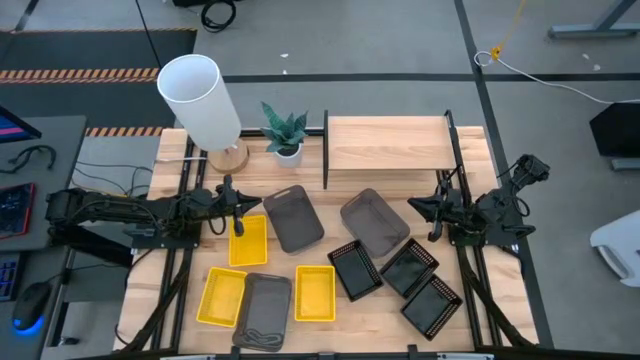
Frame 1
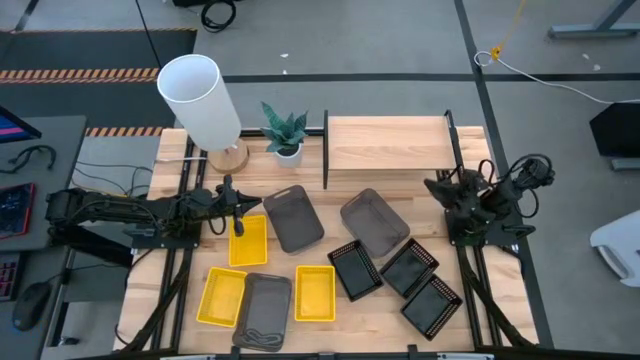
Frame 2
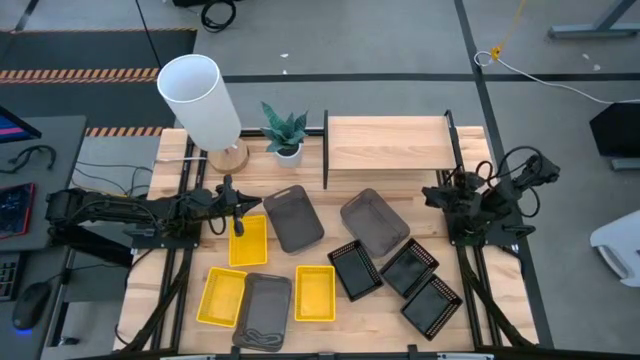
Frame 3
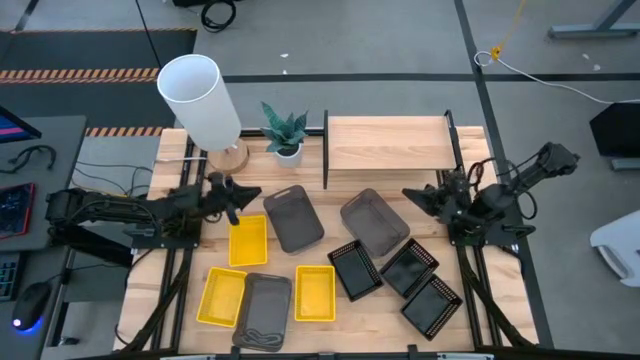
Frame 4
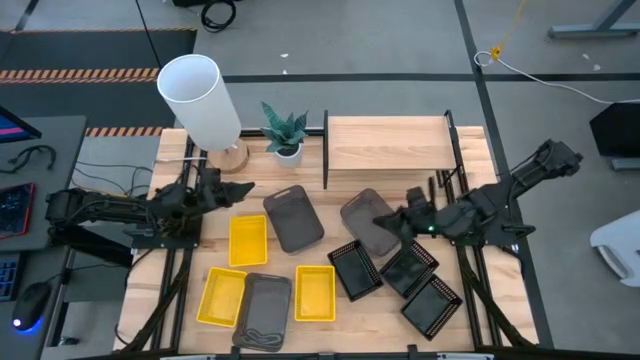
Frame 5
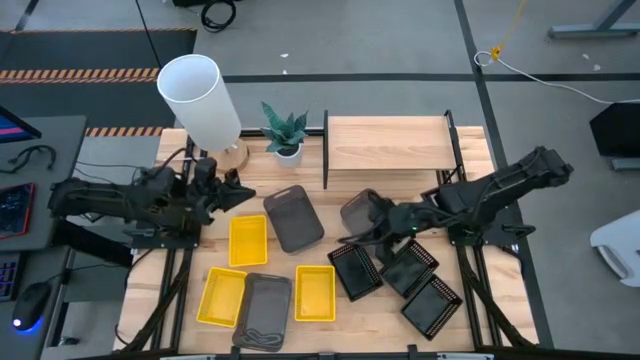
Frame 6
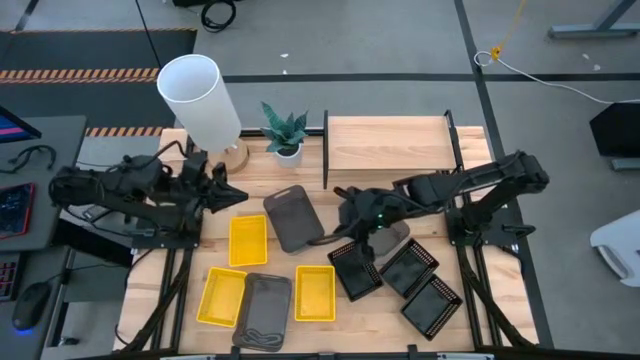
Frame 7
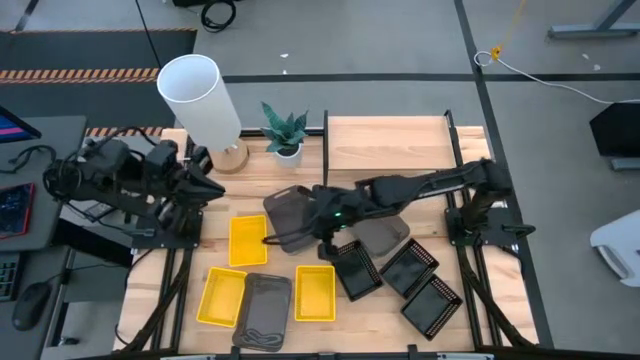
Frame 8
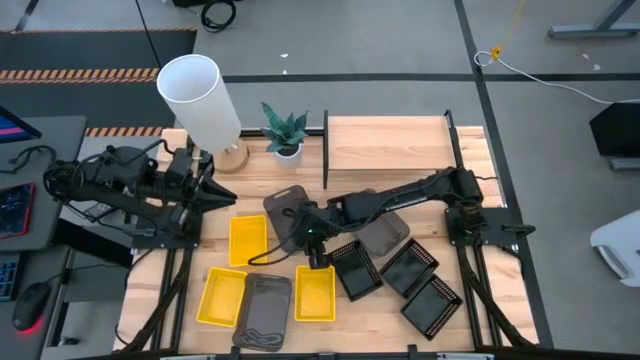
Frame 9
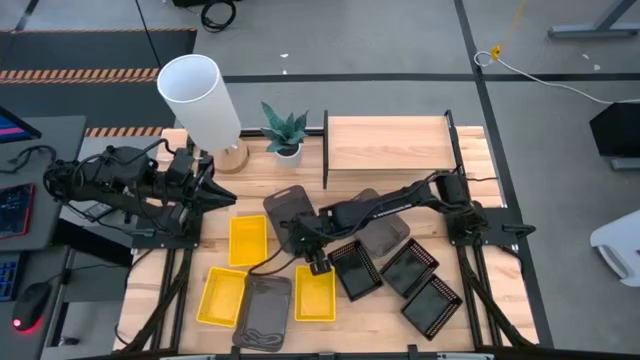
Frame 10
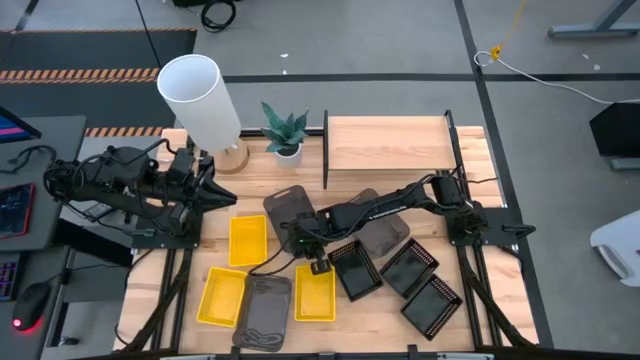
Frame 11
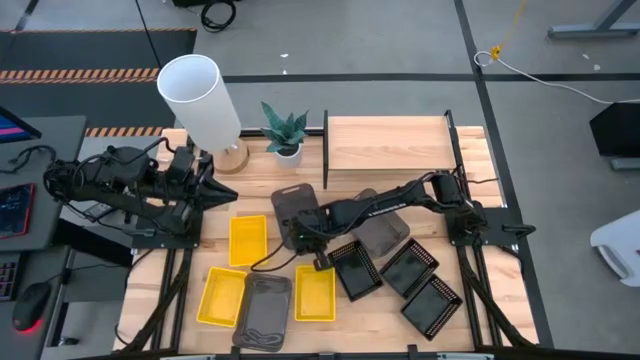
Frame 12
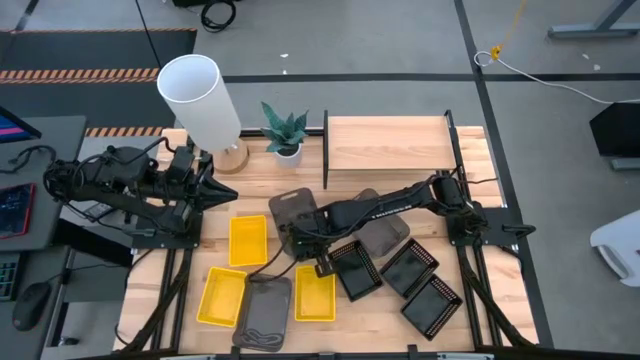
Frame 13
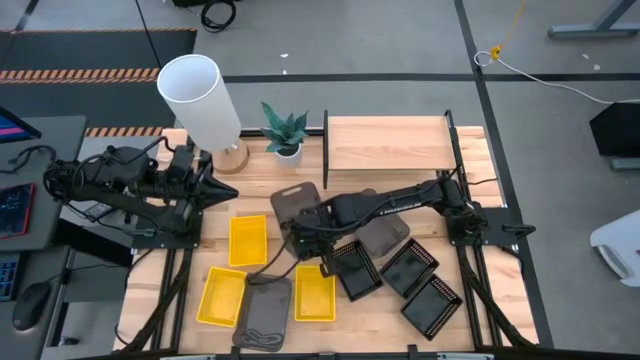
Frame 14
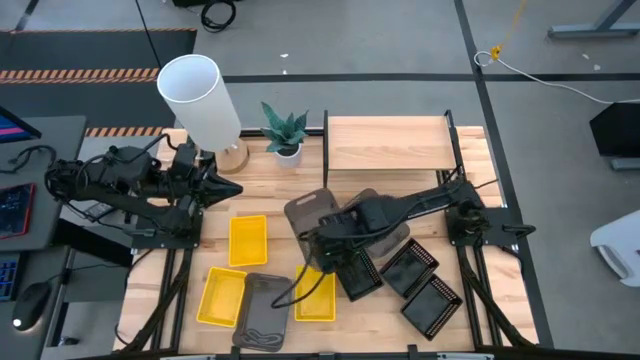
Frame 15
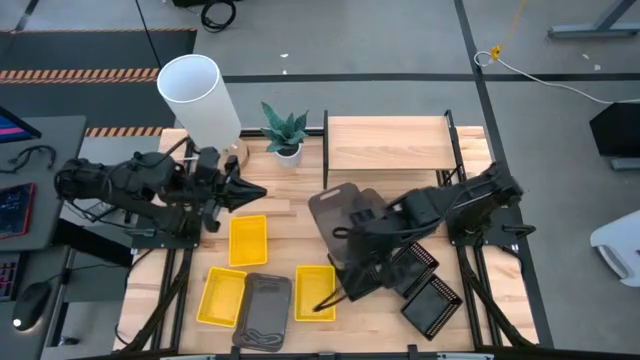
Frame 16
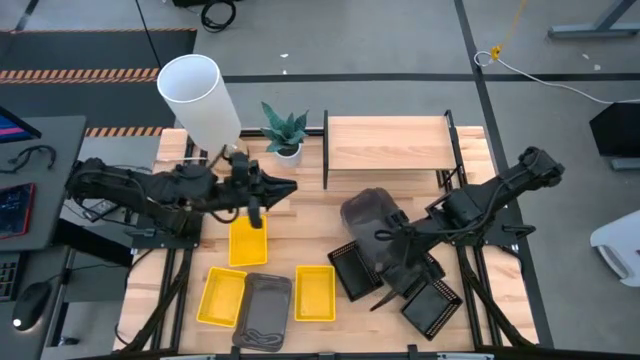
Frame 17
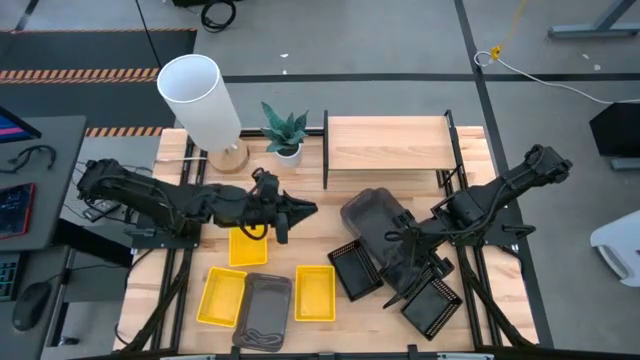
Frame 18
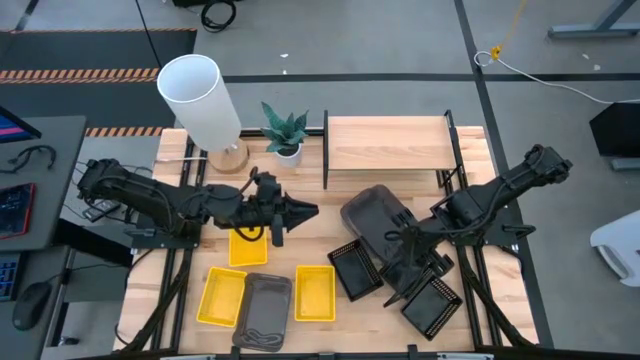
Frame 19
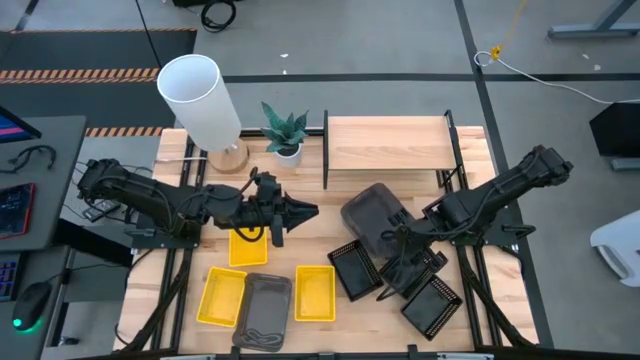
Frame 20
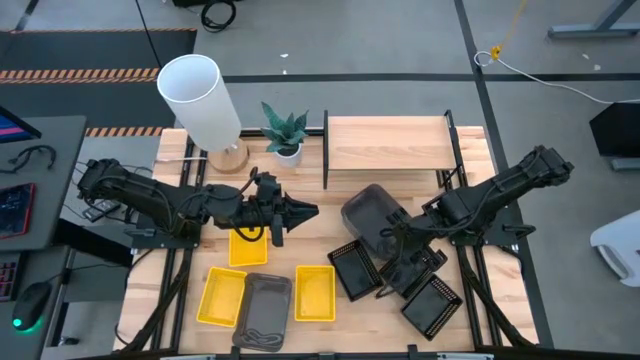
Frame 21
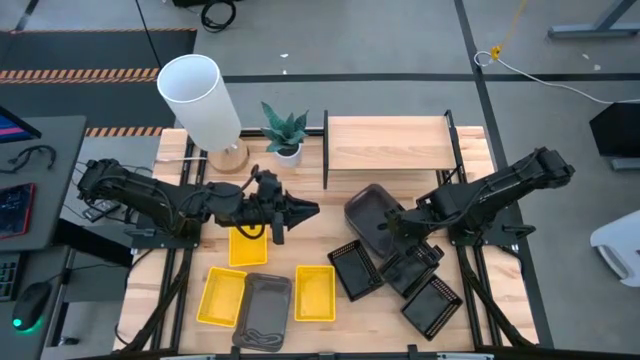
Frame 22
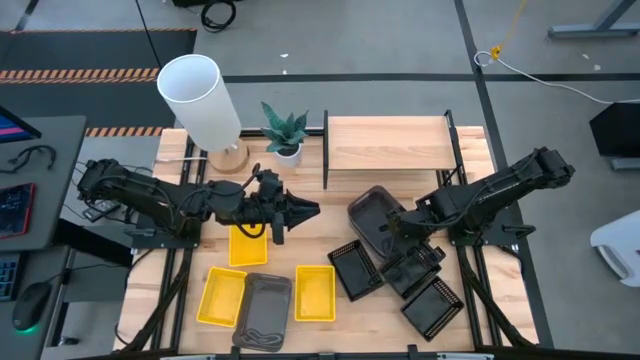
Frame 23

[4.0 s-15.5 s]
Task: Stack baskets on shelf by color
Stack the top left gray bin on top of the top right gray bin

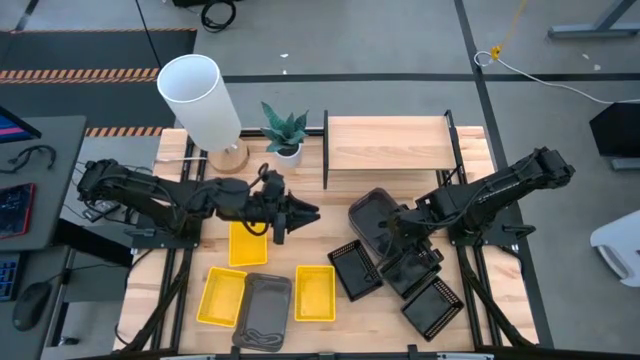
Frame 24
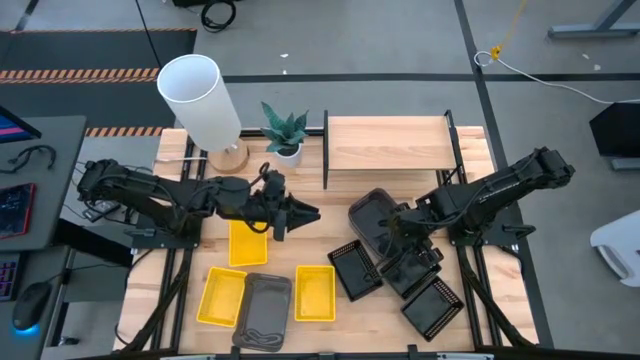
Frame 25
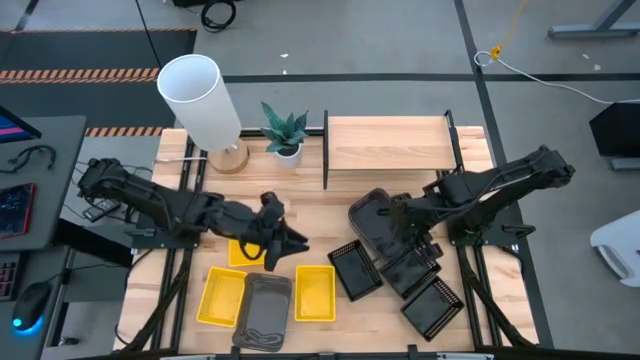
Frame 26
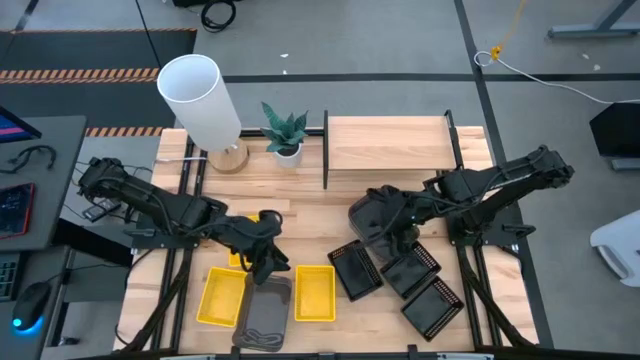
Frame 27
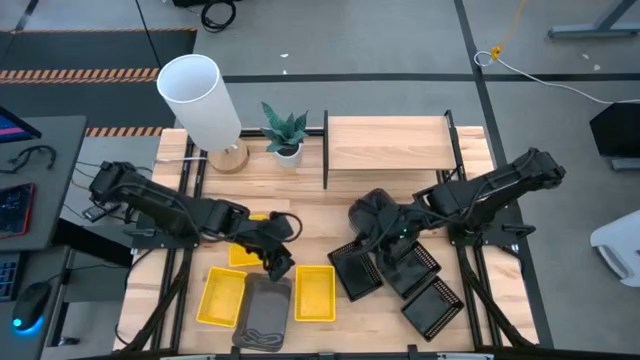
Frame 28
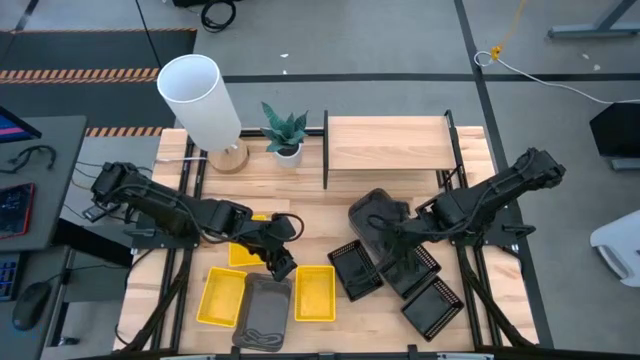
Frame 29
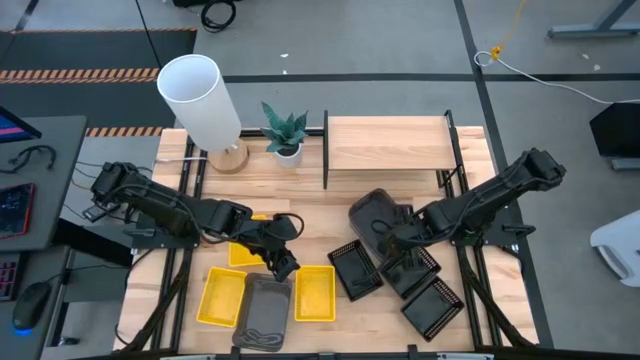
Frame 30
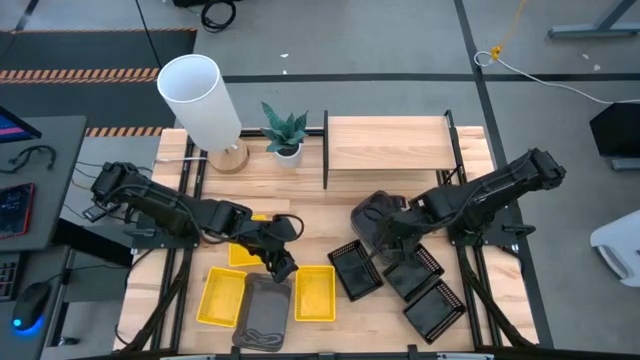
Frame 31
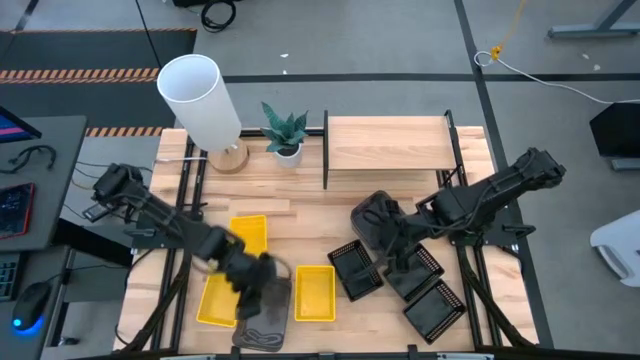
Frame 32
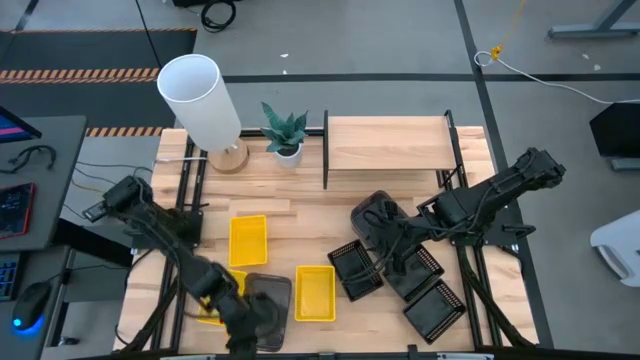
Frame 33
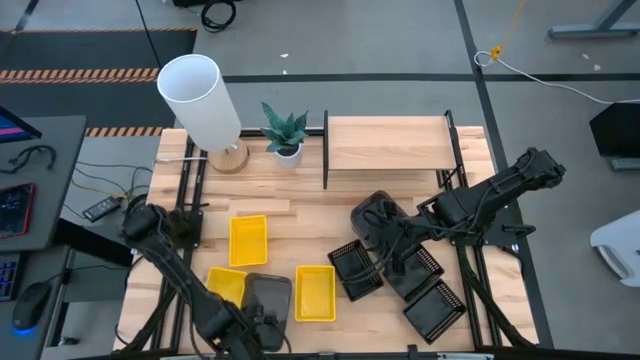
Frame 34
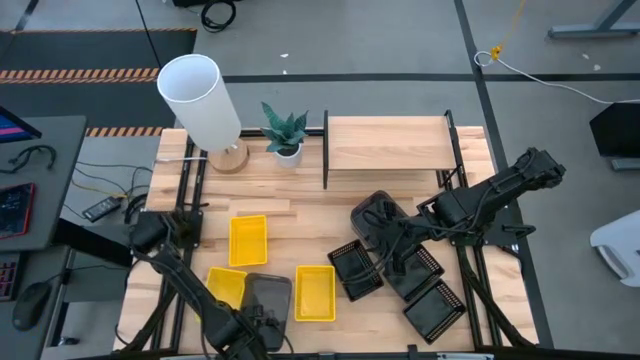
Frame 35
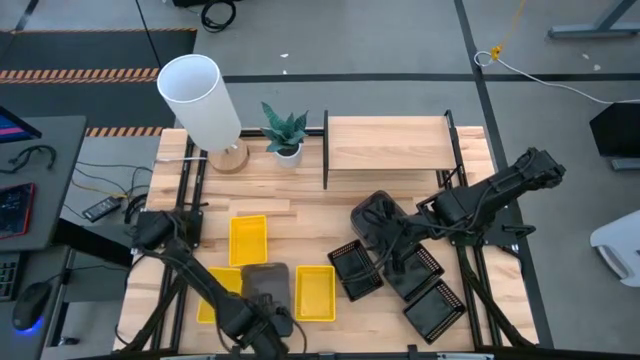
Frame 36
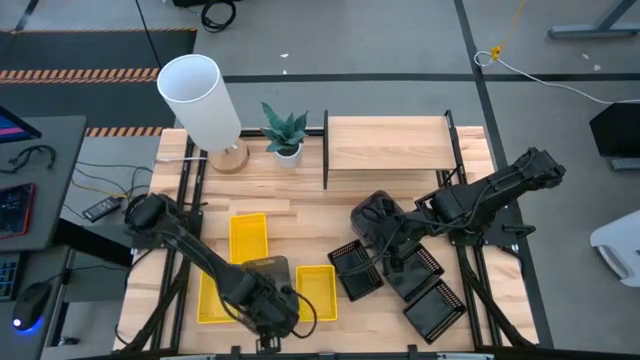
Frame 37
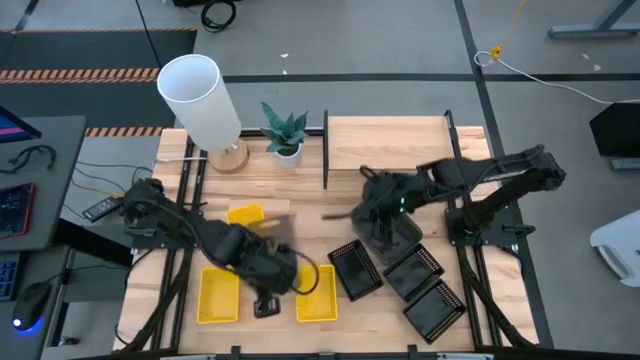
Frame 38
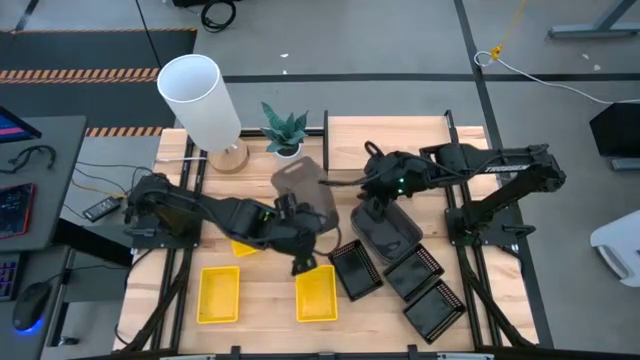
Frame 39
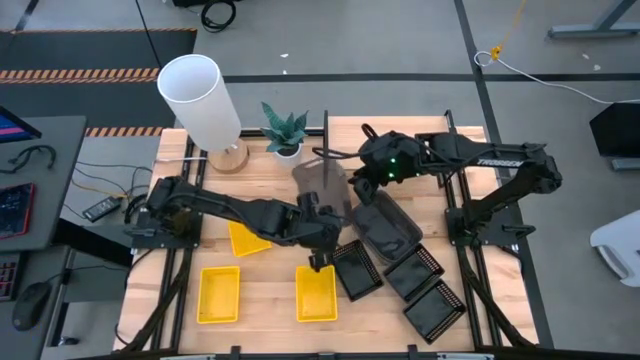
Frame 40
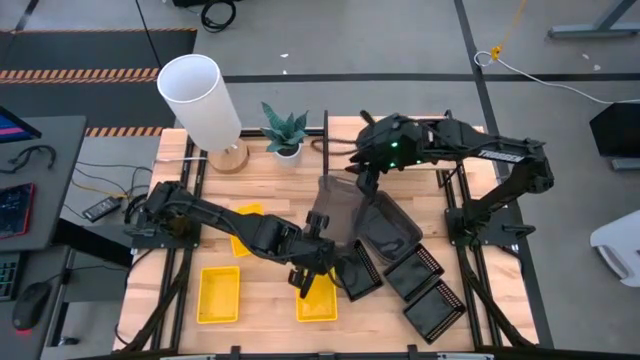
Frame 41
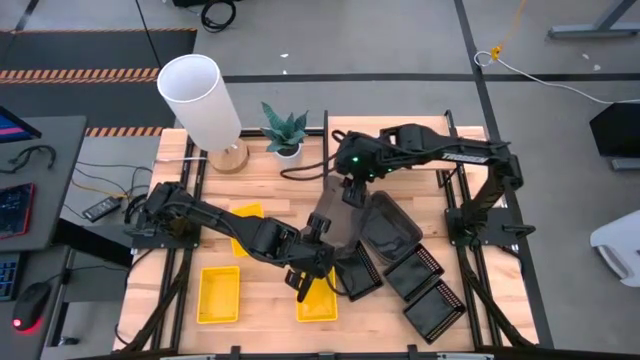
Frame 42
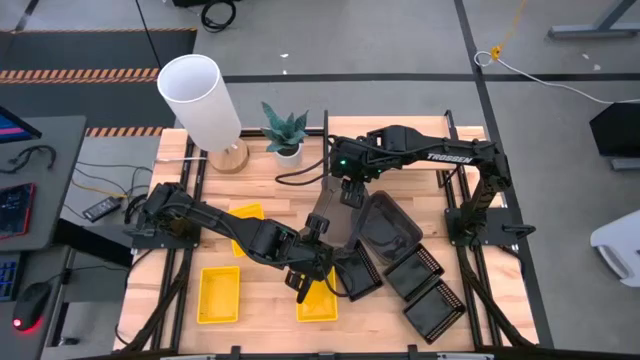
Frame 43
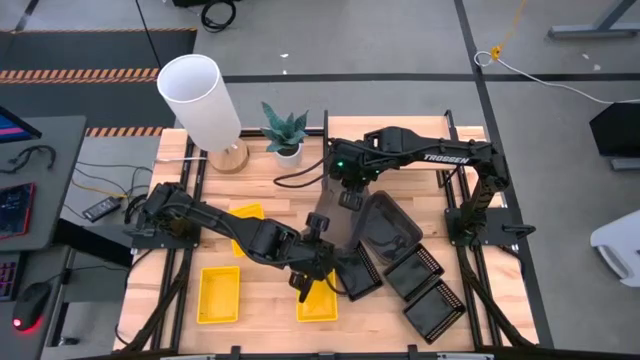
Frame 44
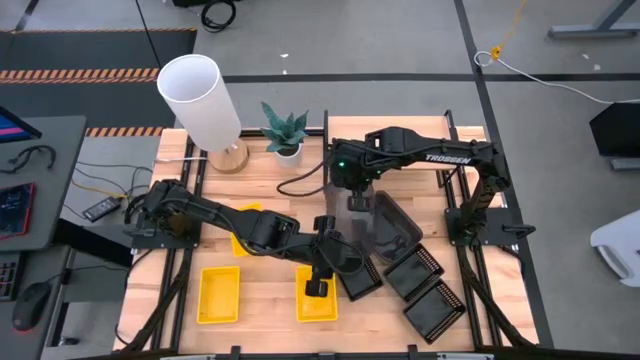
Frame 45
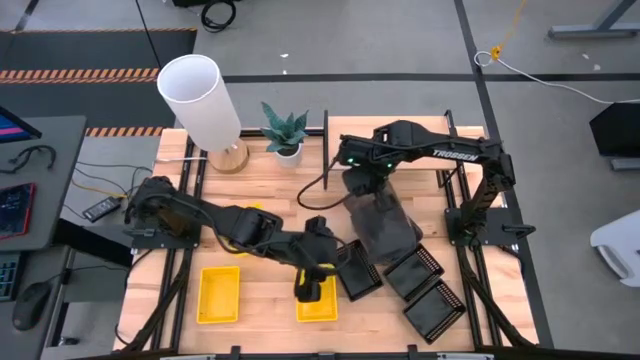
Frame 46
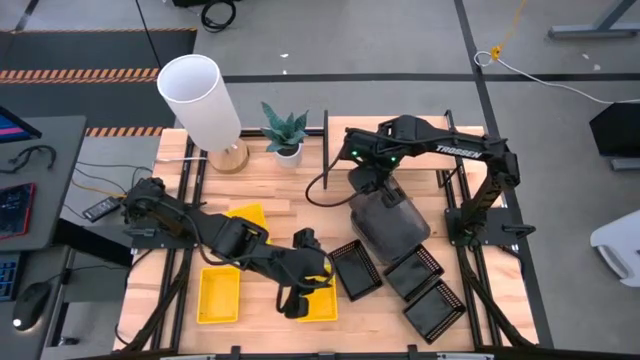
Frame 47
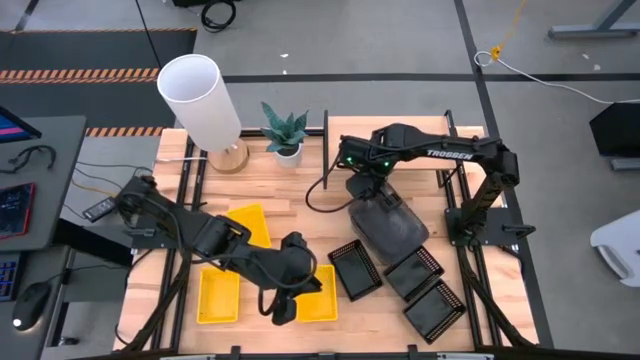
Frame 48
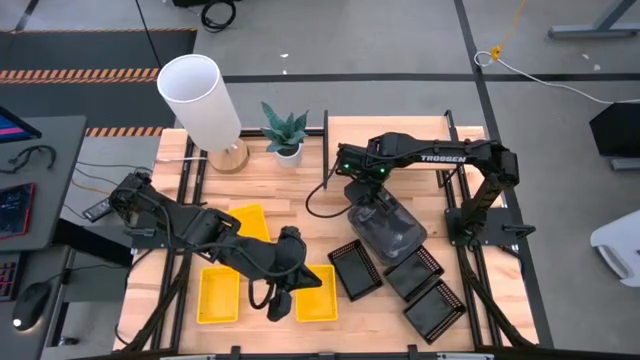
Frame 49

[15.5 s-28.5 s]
Stack the bottom gray bin on top of the gray bin
